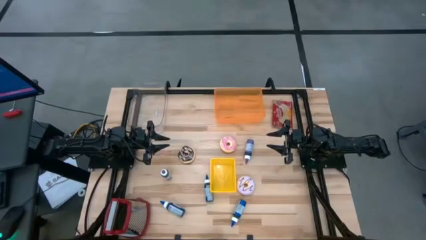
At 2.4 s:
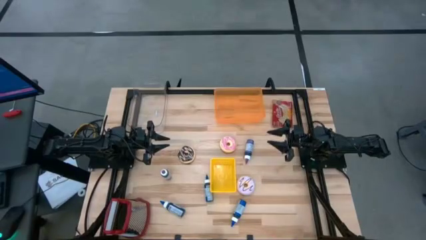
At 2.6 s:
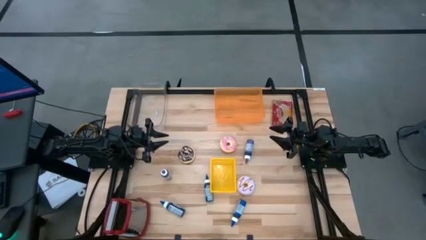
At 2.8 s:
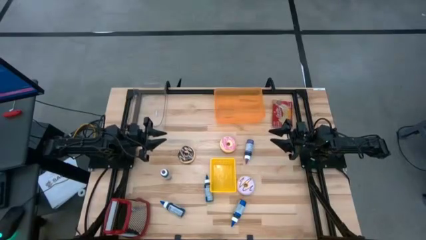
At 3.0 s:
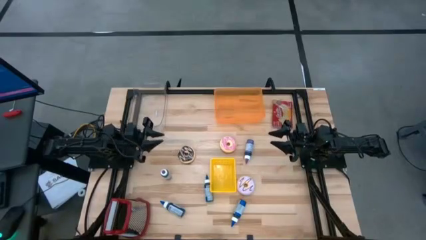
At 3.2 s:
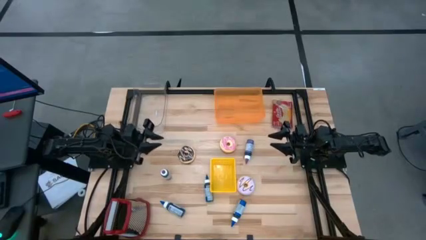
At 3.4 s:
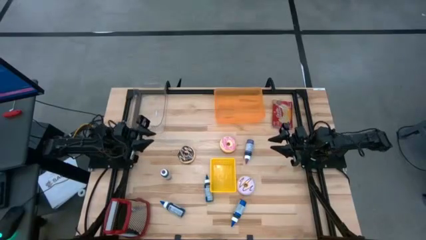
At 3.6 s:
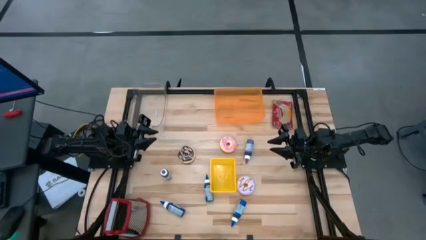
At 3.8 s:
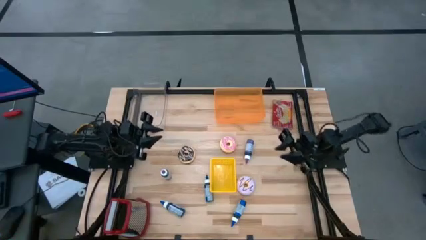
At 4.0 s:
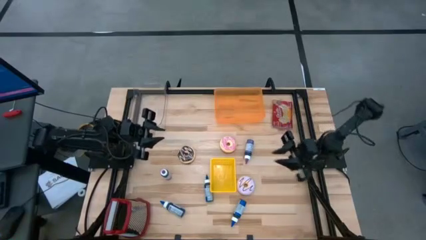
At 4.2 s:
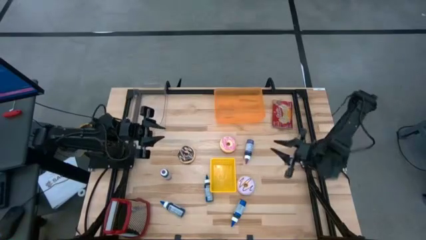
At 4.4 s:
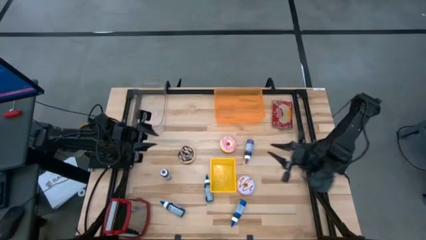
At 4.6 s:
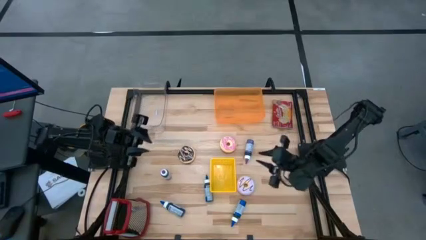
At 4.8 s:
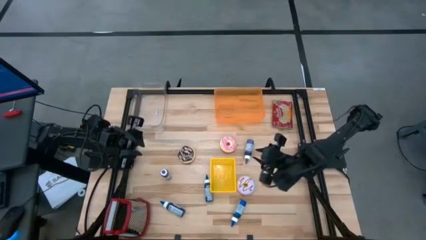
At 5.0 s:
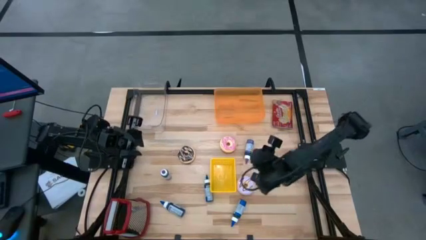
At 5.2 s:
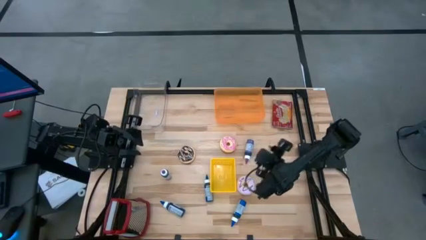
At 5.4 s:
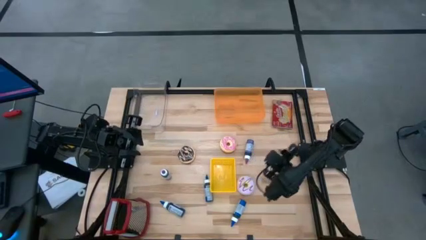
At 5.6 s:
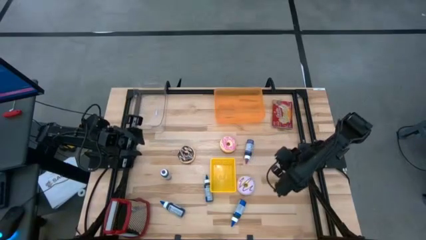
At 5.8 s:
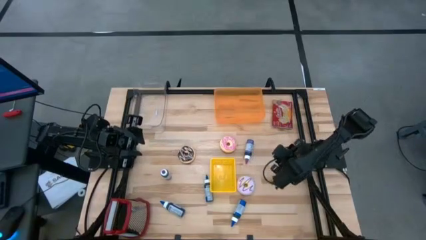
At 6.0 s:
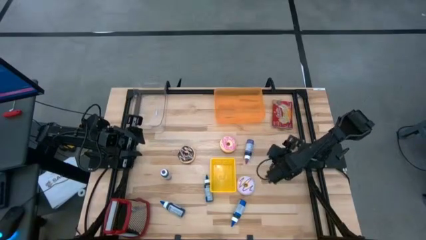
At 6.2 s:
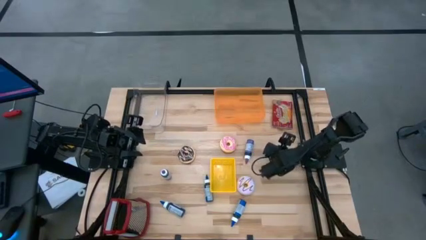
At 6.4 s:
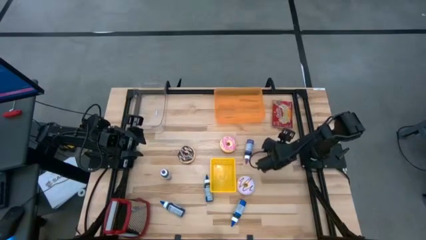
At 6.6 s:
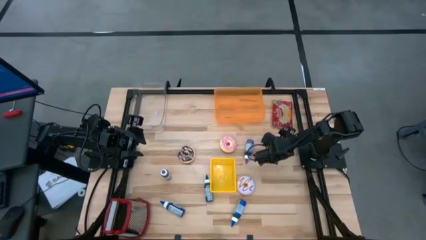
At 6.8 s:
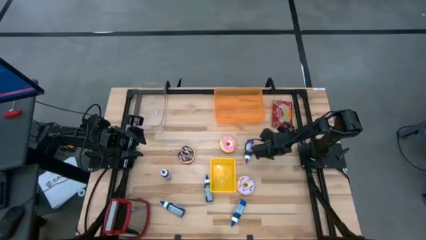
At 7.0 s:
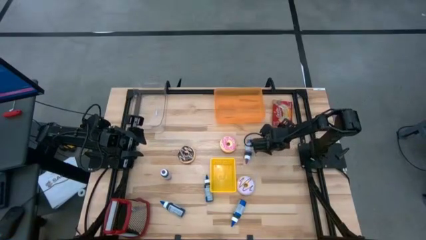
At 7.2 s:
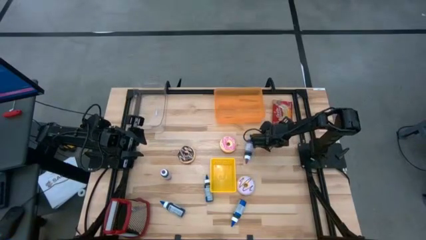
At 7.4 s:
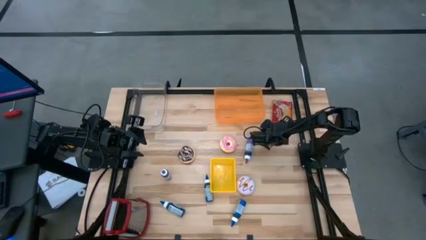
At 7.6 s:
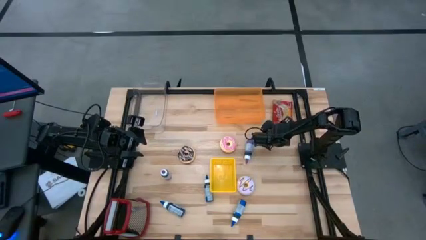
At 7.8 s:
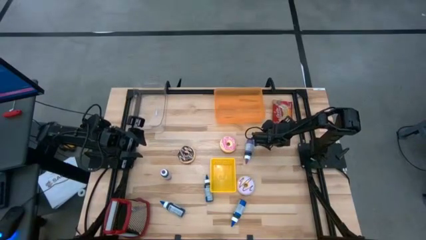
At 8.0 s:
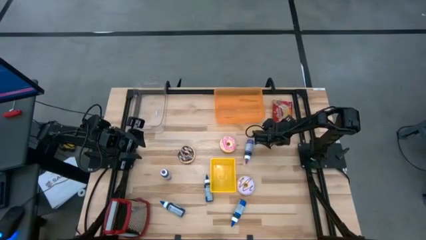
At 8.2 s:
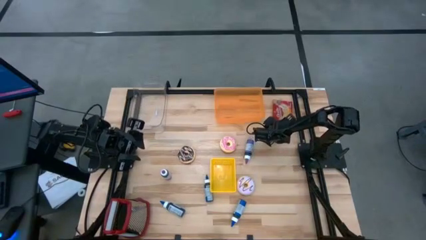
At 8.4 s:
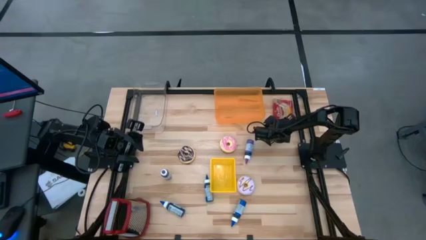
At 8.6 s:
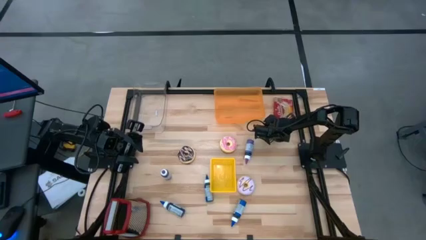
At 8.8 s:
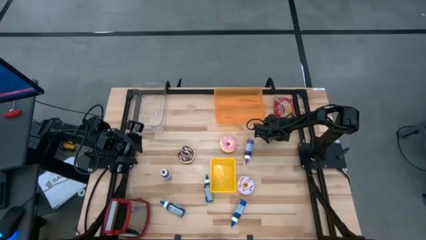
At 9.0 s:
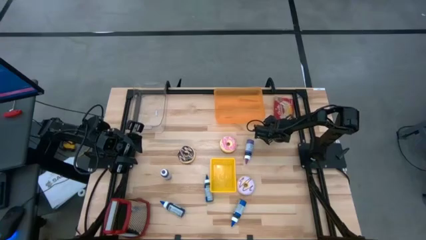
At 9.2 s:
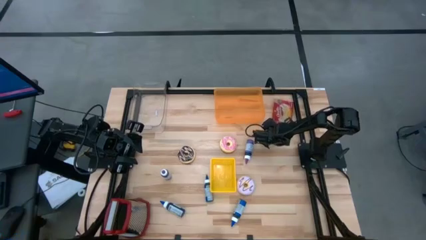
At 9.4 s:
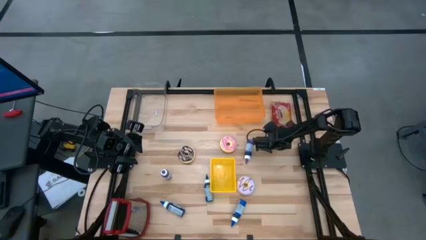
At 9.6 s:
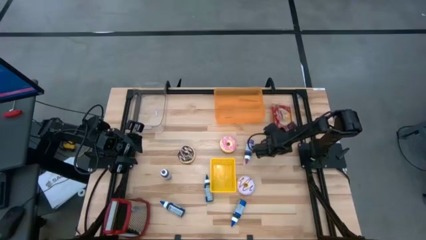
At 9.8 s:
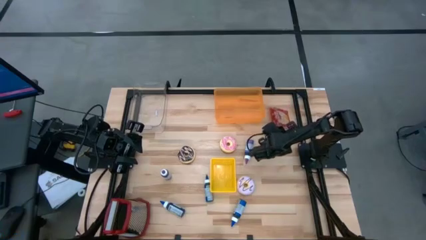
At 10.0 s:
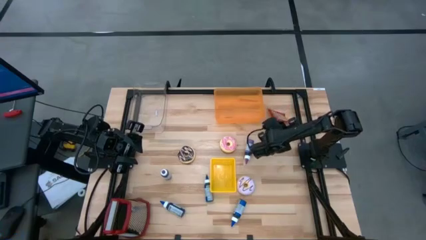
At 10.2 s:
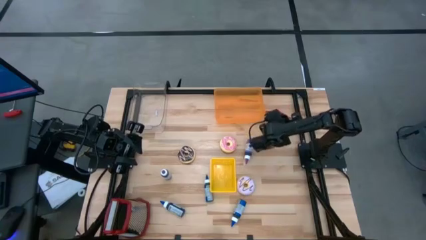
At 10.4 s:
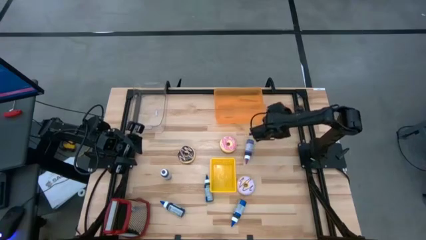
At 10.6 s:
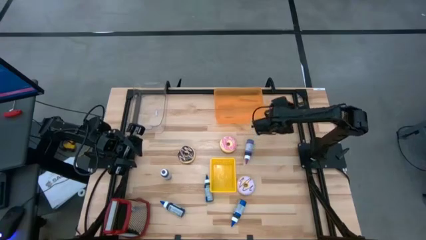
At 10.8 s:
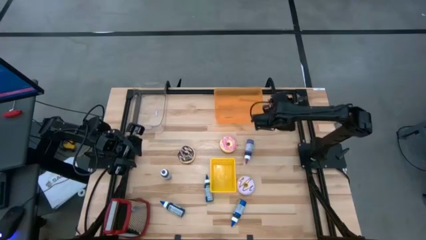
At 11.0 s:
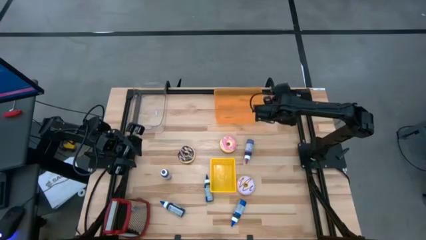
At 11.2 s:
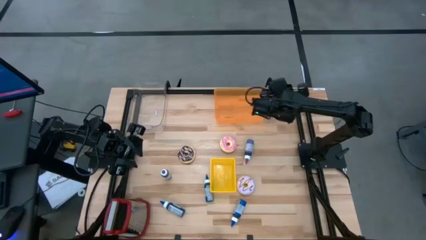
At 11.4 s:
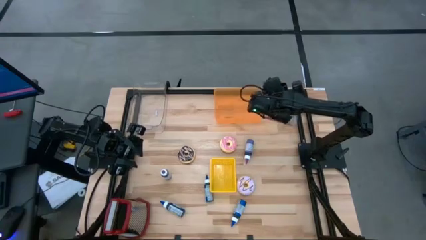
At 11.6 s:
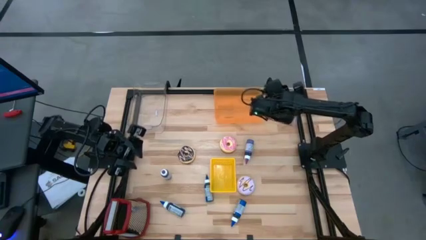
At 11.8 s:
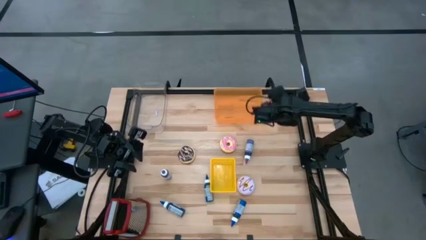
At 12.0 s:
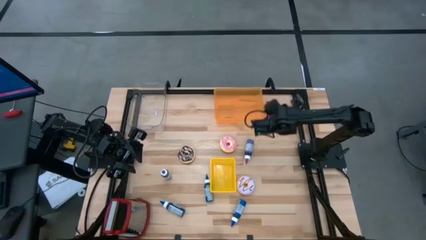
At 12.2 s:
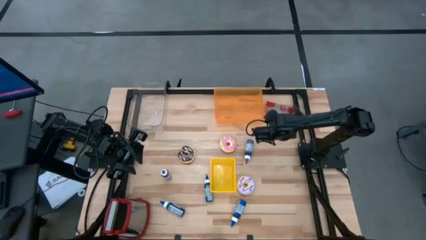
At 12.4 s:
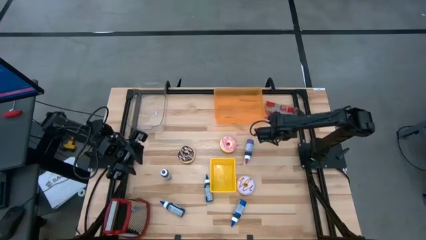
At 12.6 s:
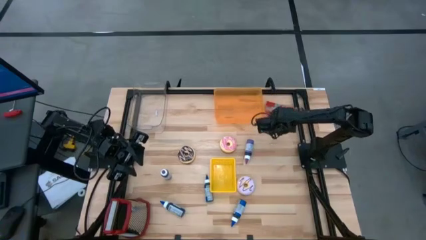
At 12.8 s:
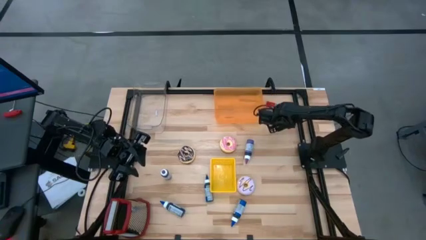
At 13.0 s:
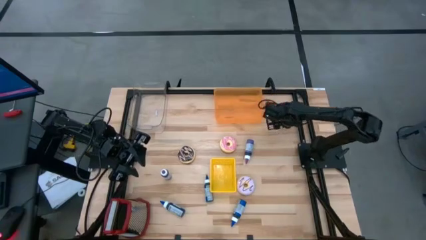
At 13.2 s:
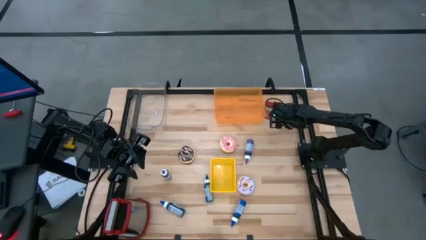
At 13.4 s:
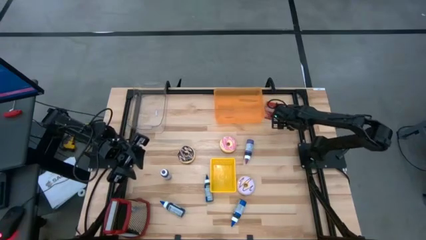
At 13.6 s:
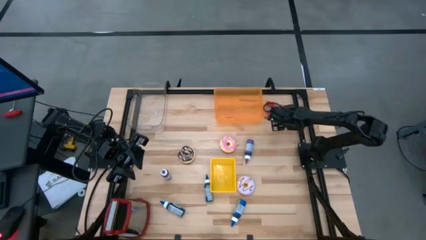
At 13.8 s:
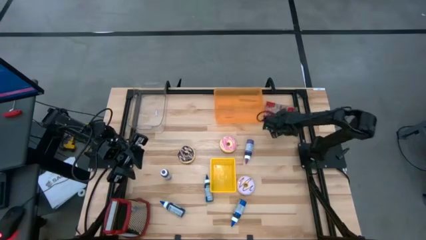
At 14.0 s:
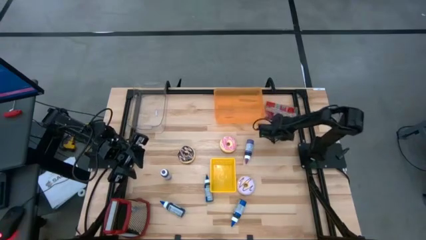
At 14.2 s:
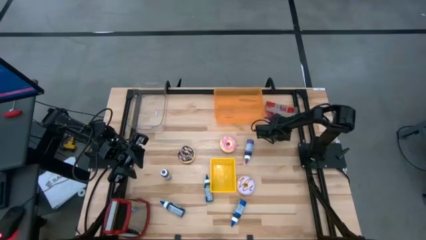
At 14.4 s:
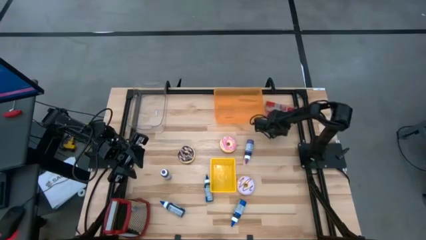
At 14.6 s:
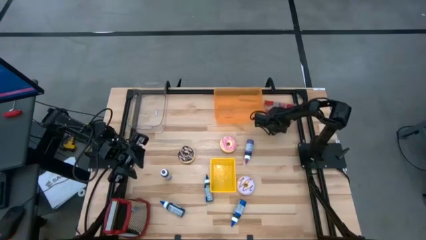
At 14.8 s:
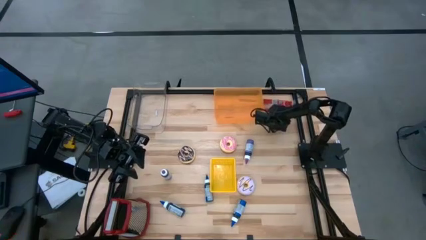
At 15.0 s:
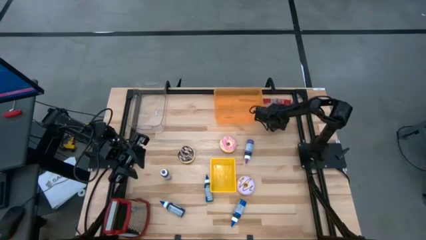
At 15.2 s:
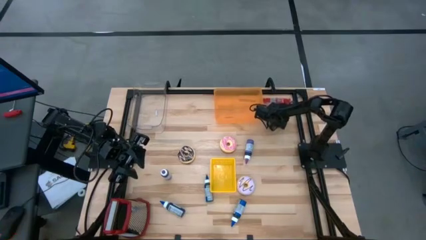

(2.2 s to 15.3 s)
Put the red popcorn bag into the orange bin
